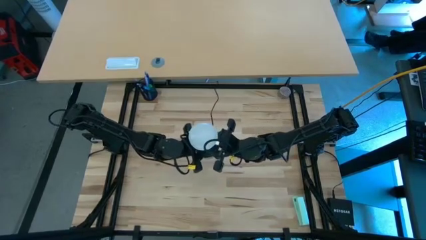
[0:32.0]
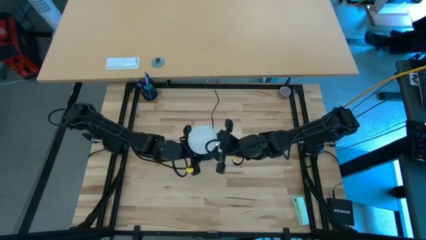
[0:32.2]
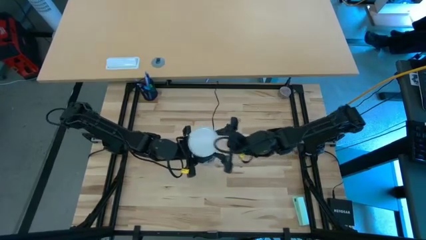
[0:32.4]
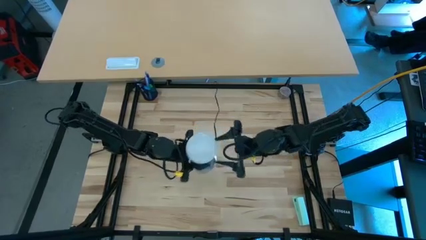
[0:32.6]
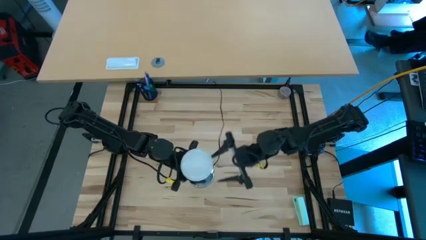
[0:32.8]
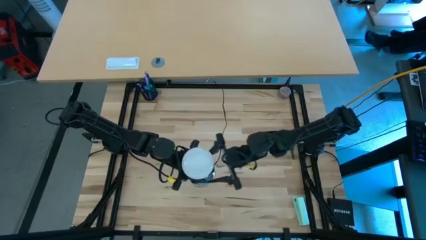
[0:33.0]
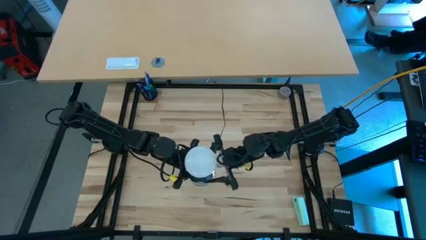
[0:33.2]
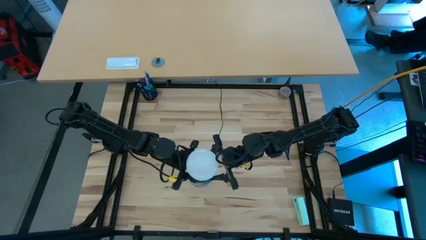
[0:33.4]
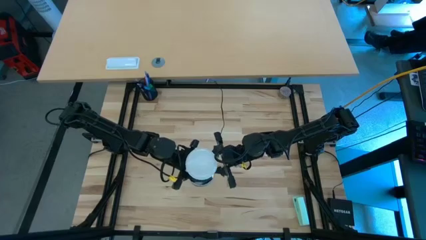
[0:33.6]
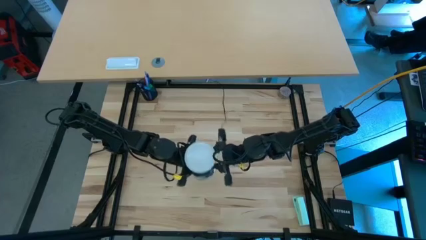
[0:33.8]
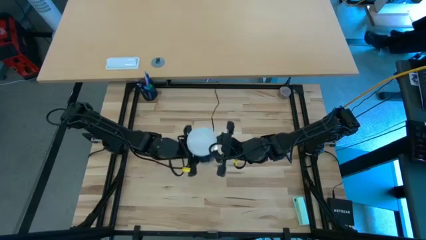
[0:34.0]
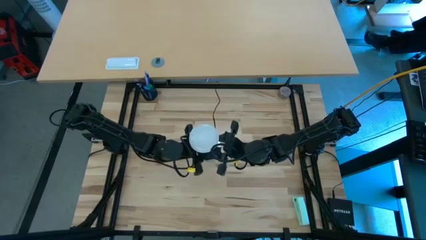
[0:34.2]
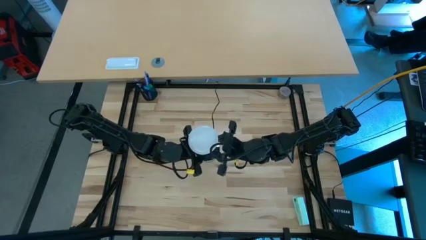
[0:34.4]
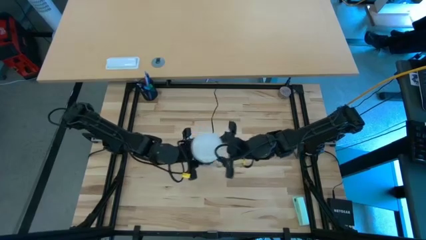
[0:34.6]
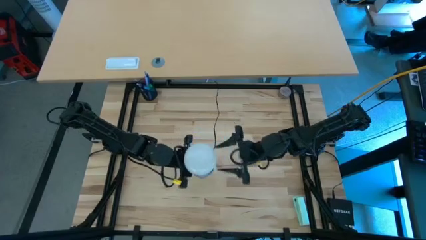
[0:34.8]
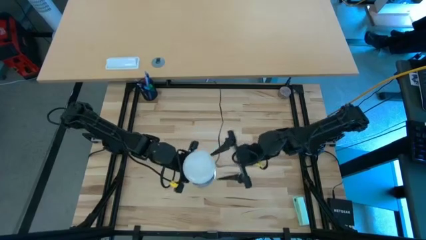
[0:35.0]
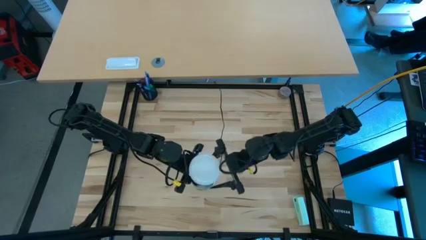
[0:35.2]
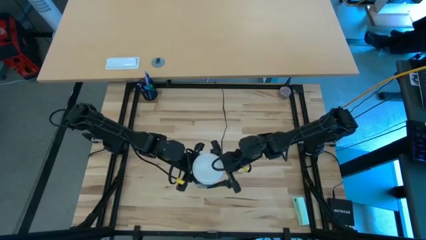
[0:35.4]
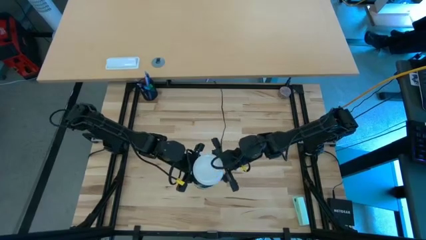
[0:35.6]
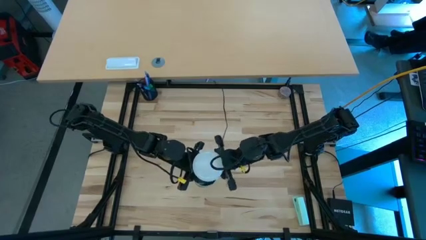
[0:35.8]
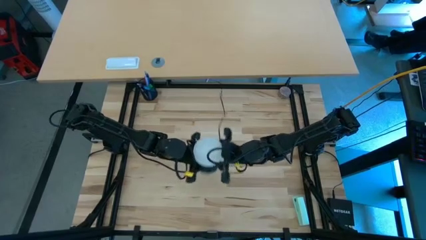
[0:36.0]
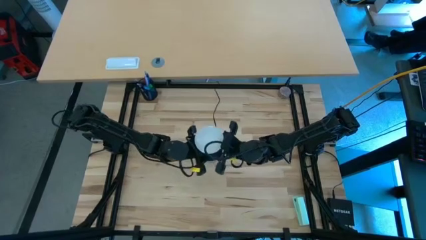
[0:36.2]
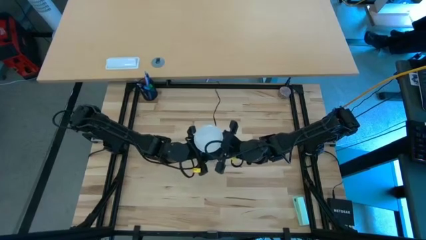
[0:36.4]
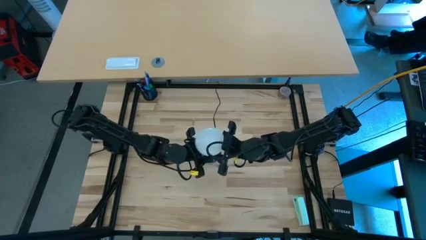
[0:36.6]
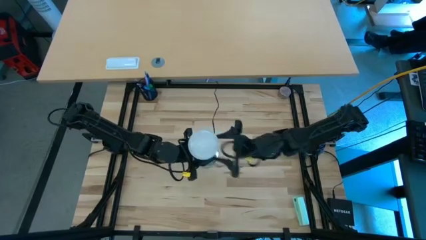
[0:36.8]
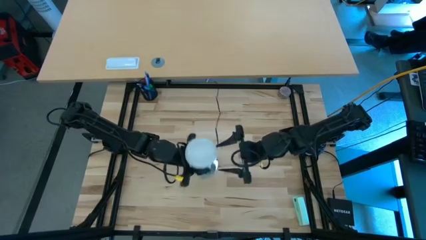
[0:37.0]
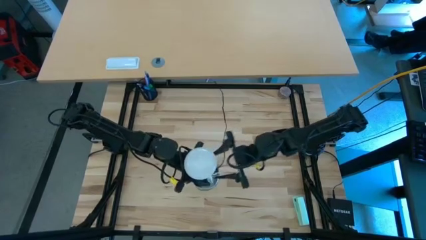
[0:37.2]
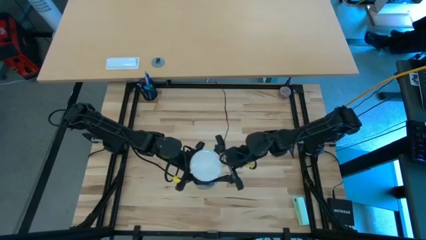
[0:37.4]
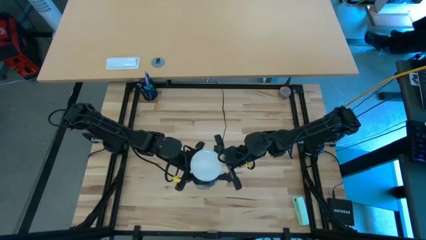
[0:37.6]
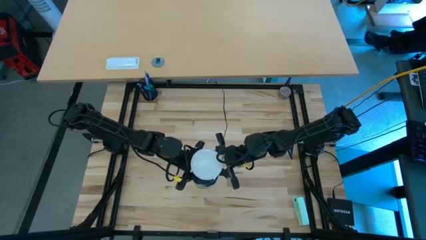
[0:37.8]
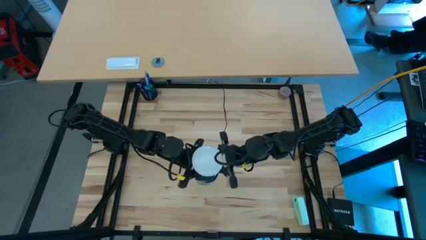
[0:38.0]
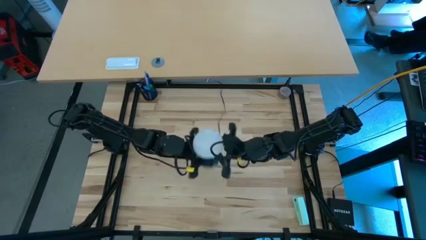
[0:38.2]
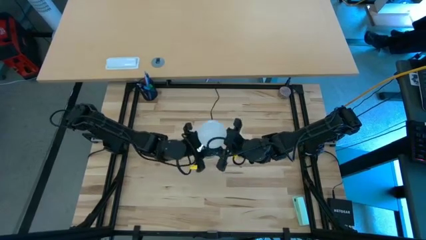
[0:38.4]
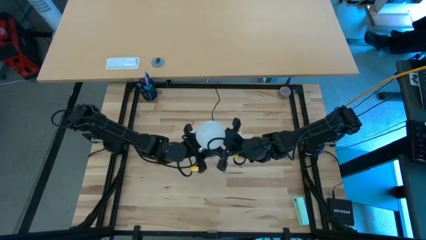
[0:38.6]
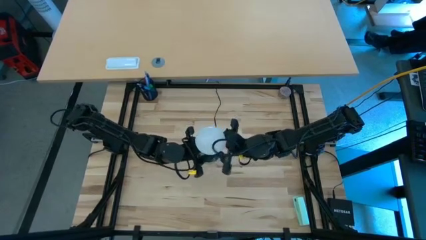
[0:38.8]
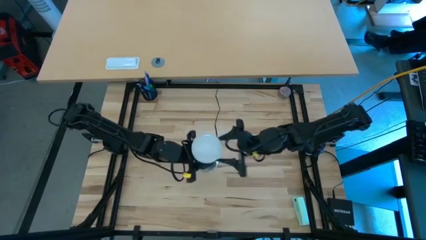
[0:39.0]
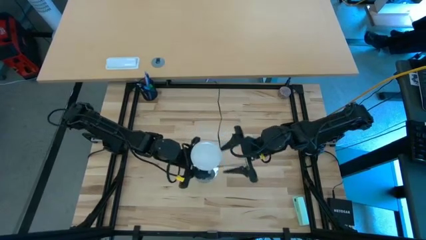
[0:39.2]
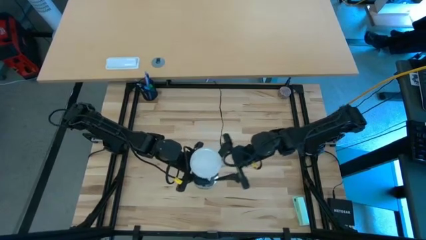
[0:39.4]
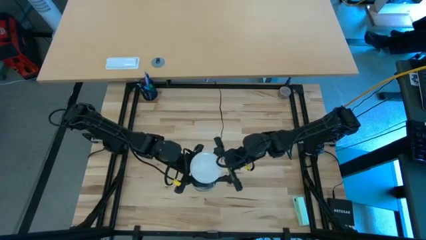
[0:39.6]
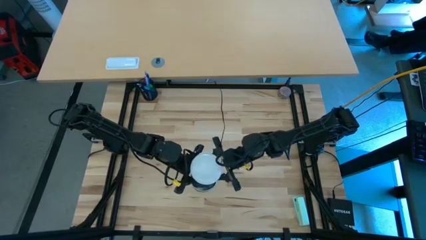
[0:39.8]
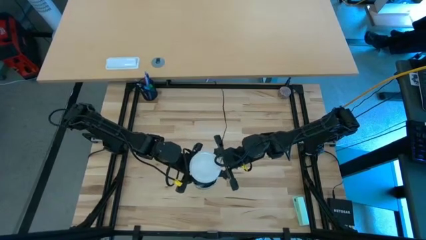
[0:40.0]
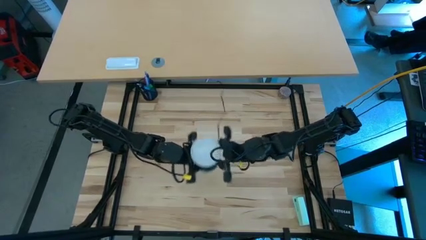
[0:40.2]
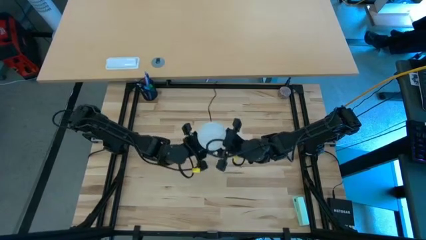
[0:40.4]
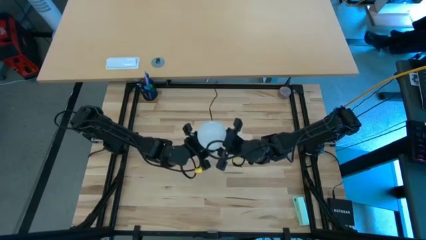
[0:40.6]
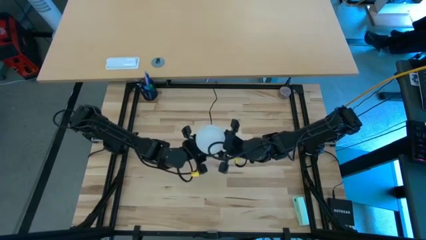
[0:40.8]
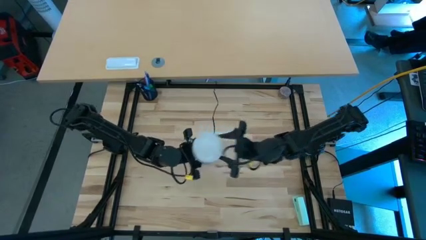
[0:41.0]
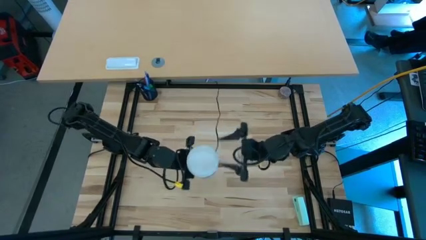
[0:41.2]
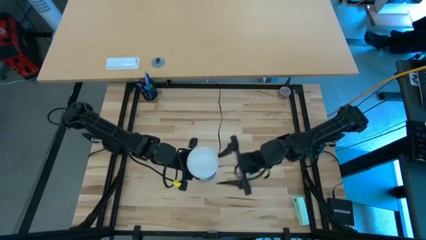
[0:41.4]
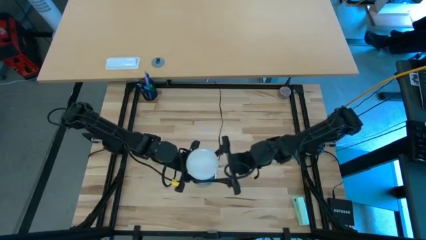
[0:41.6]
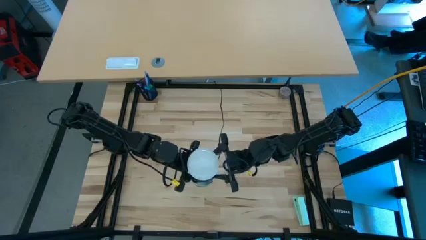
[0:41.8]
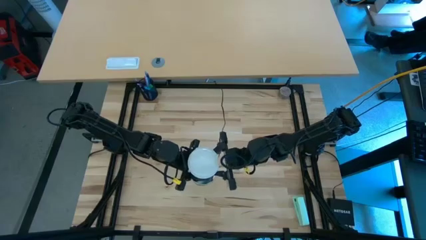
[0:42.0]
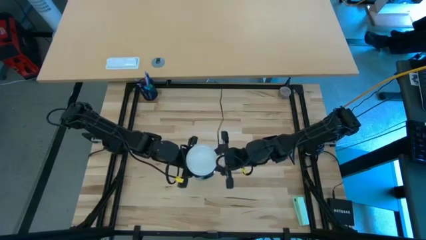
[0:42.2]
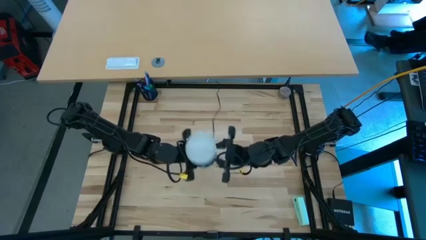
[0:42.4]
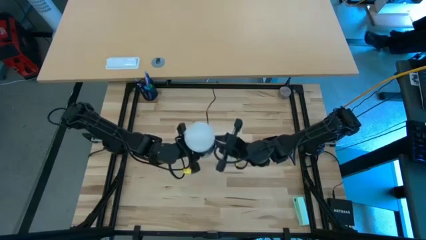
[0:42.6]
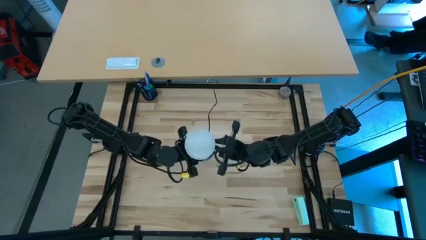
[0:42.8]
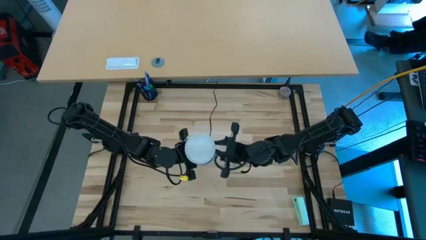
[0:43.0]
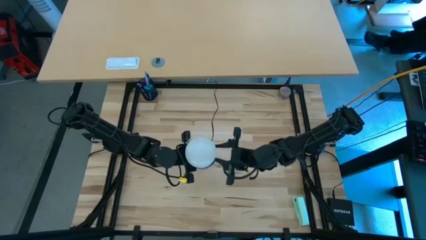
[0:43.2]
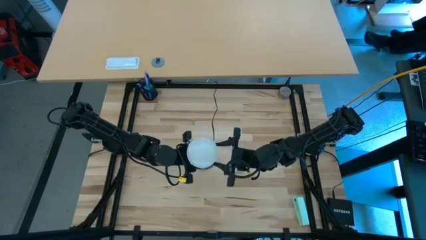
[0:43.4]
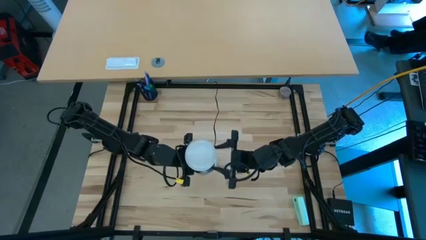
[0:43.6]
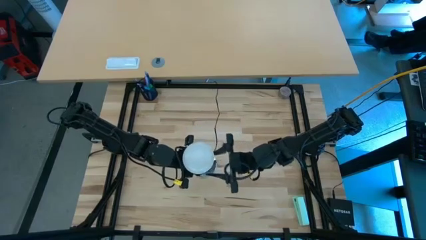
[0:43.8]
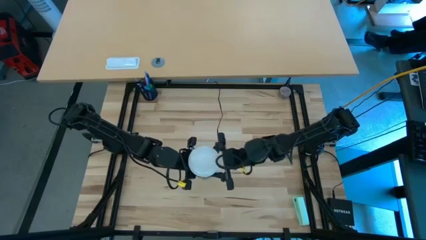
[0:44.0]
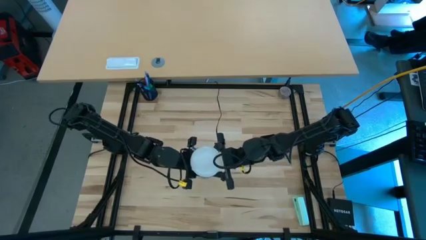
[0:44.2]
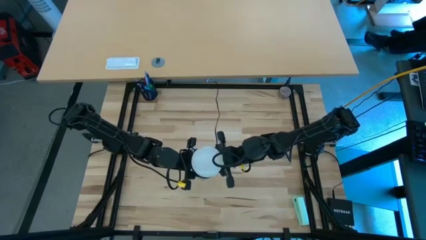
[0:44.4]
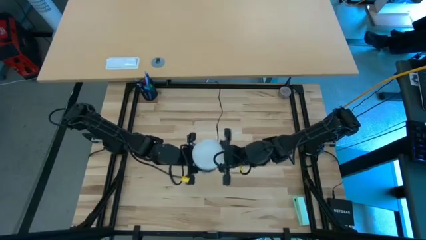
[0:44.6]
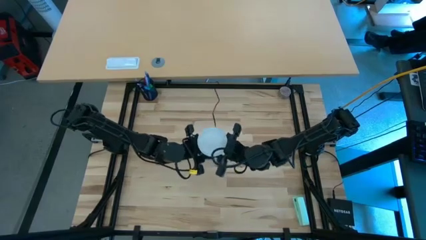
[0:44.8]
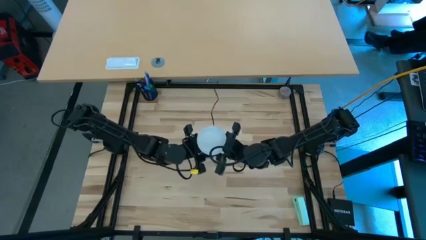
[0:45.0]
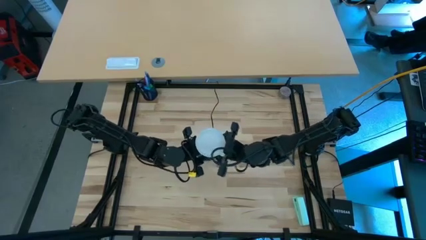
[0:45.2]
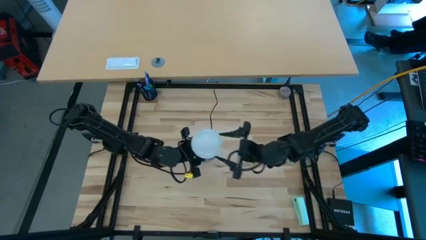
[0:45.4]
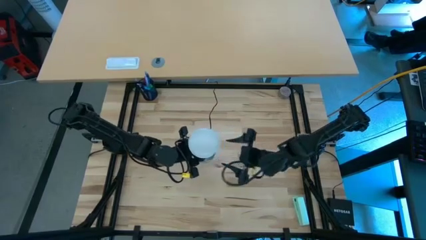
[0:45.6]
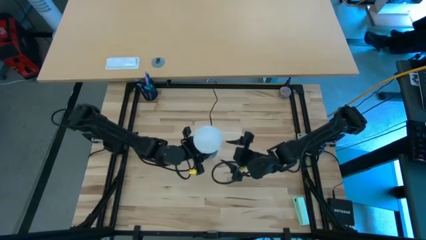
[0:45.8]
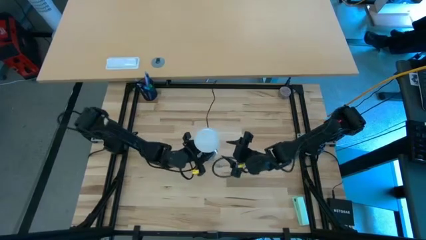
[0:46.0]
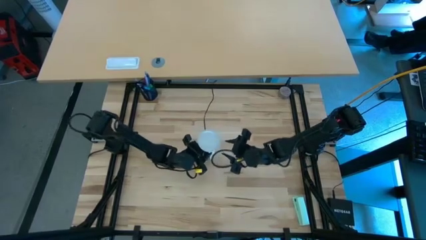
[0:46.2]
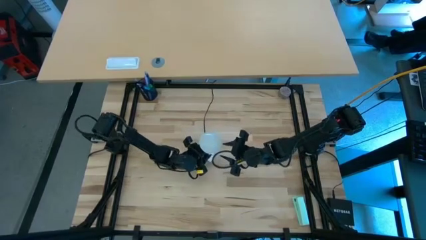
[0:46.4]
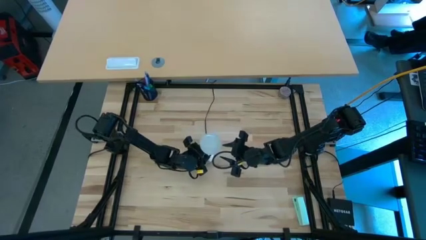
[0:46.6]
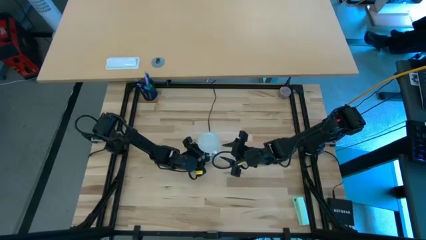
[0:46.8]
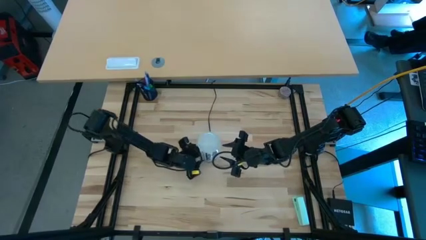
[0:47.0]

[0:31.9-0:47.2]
Task: Screw lightbulb
Insert the lightbulb into the lamp
